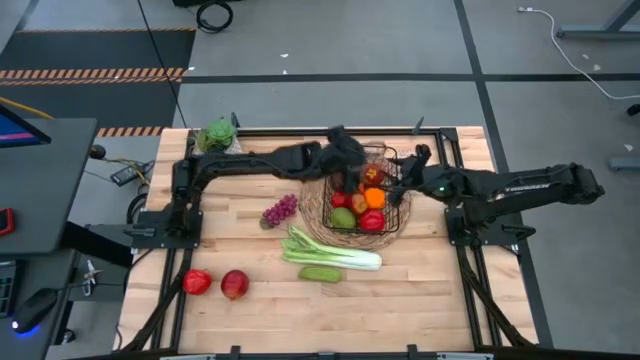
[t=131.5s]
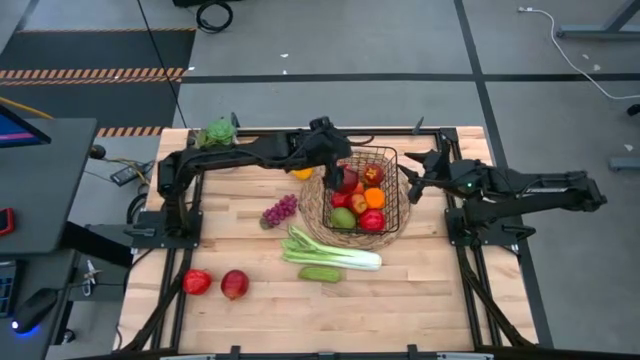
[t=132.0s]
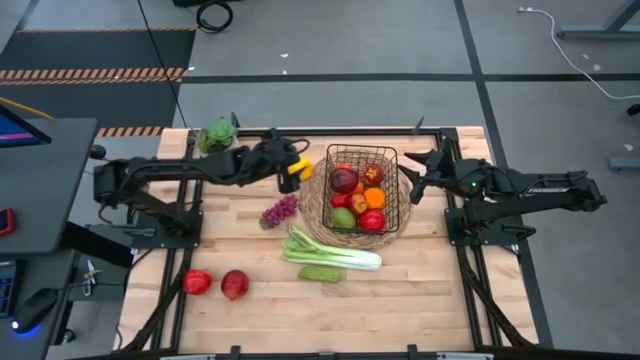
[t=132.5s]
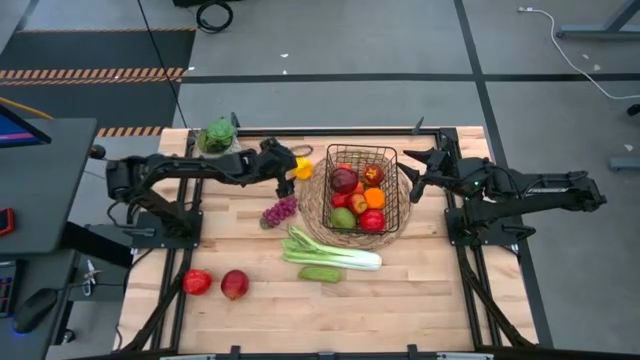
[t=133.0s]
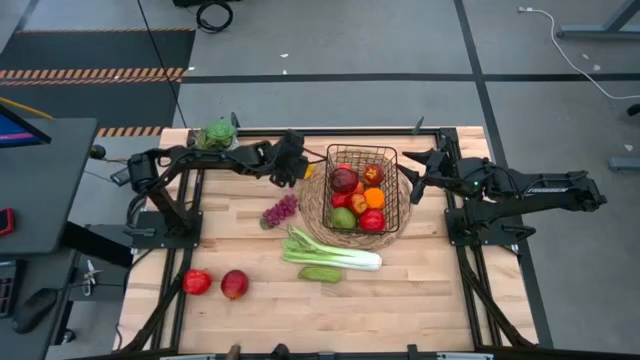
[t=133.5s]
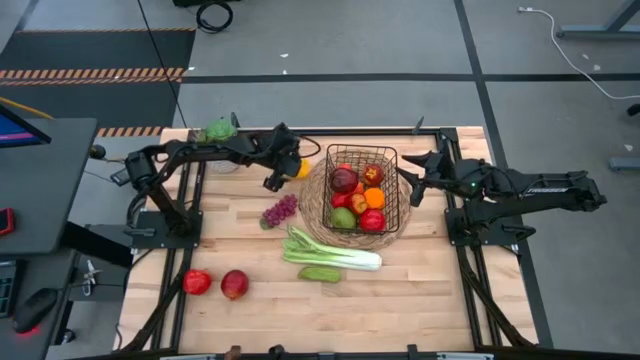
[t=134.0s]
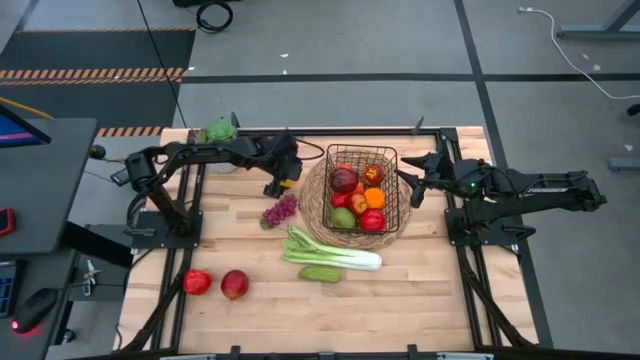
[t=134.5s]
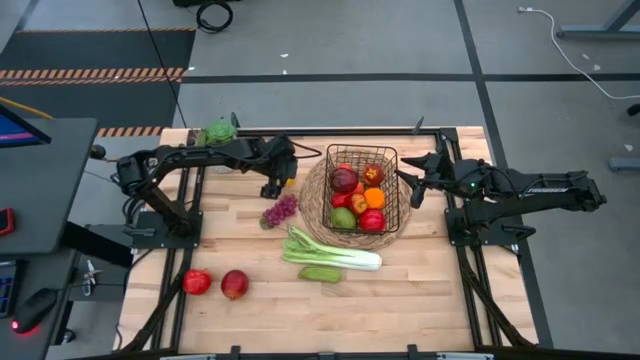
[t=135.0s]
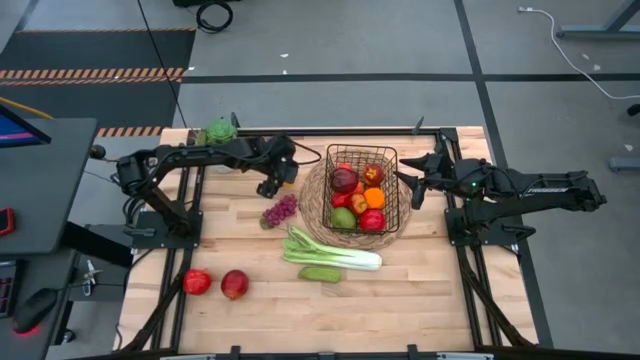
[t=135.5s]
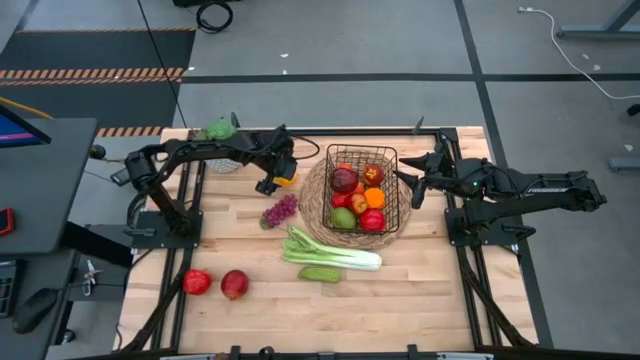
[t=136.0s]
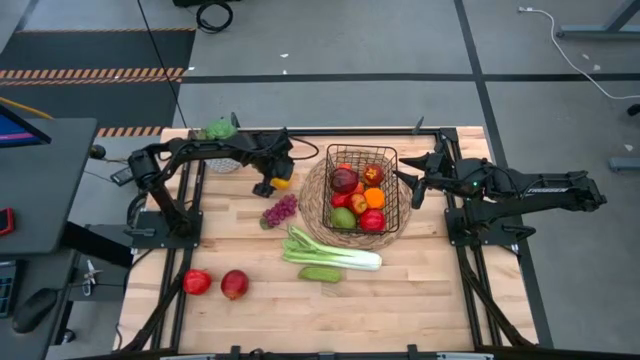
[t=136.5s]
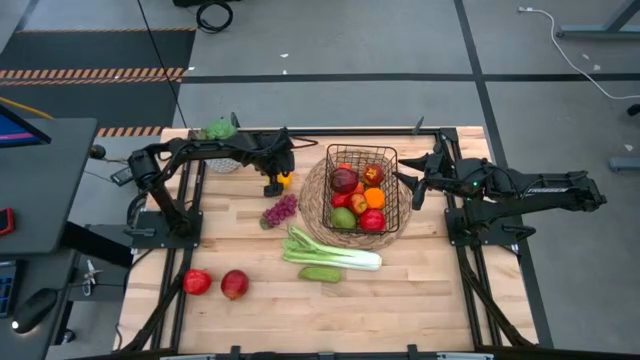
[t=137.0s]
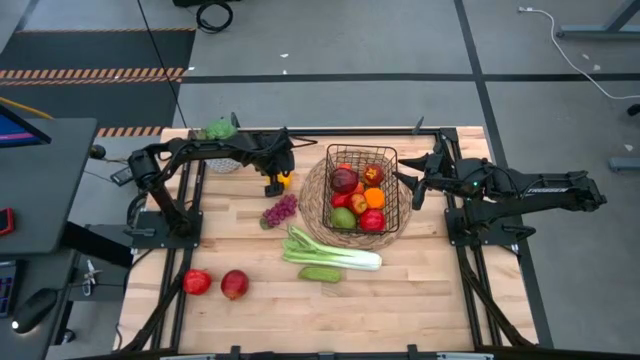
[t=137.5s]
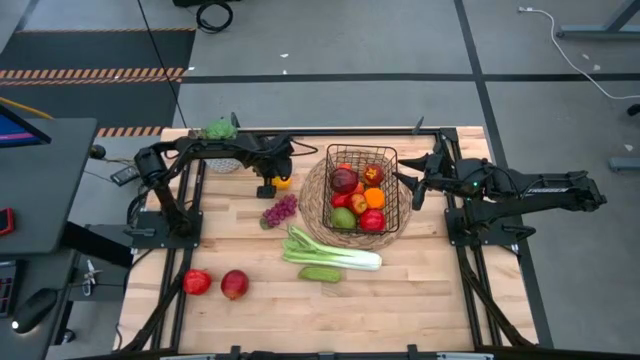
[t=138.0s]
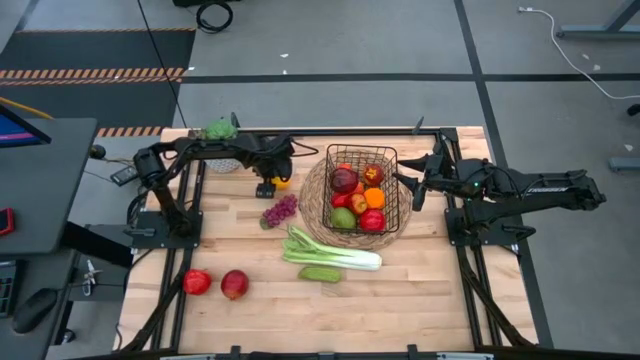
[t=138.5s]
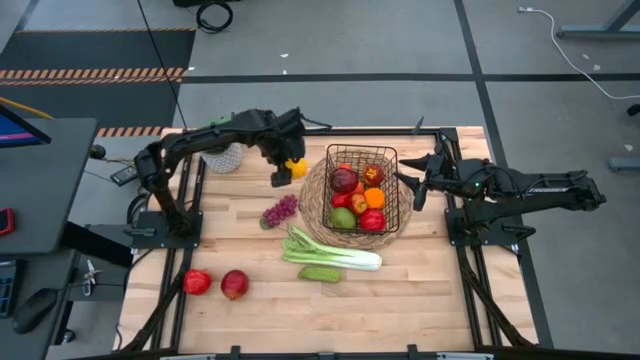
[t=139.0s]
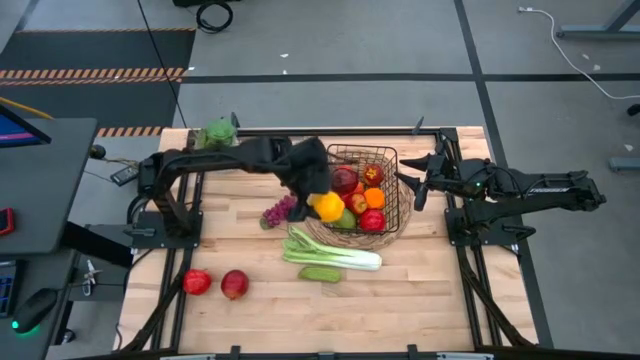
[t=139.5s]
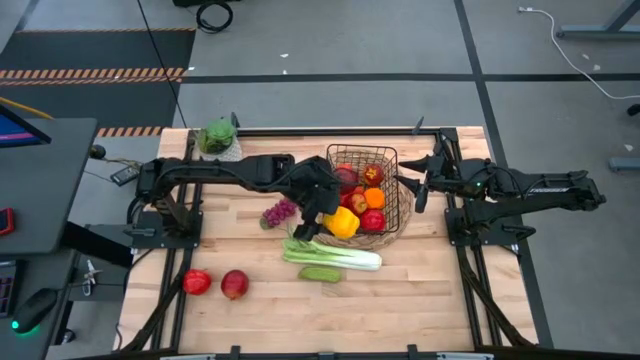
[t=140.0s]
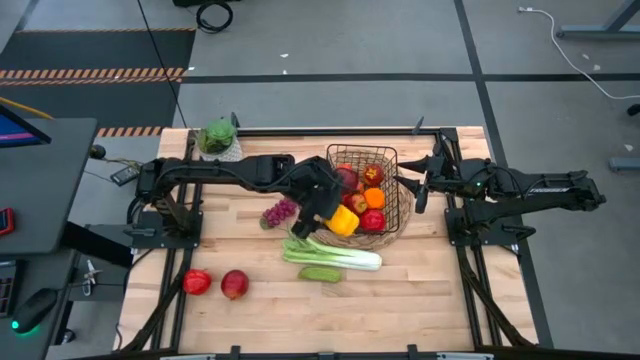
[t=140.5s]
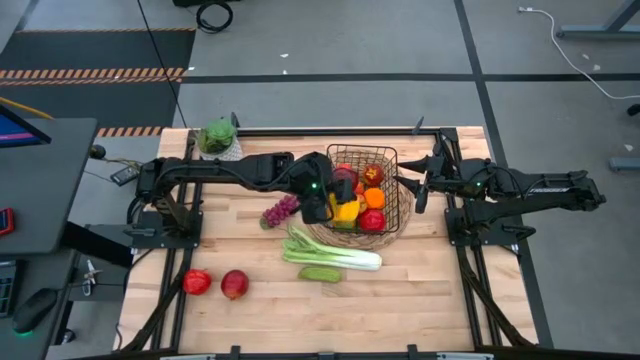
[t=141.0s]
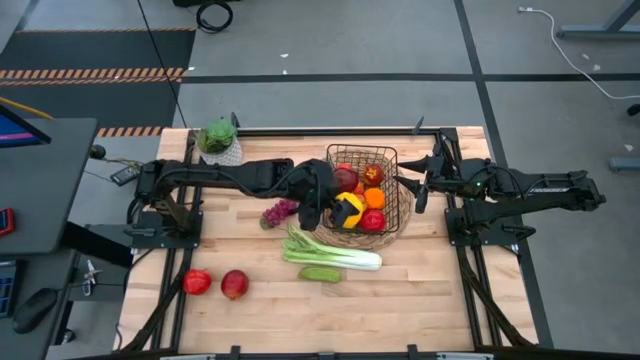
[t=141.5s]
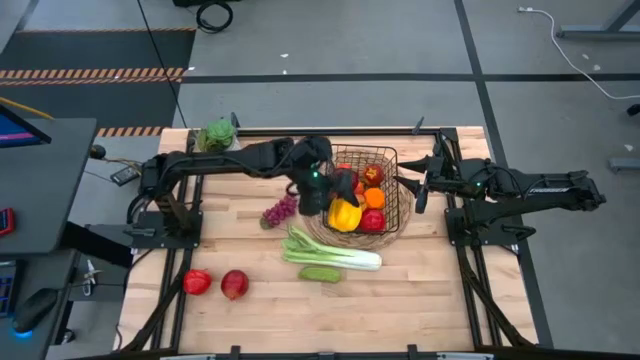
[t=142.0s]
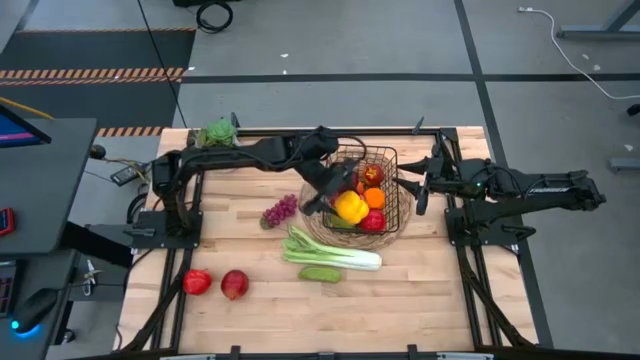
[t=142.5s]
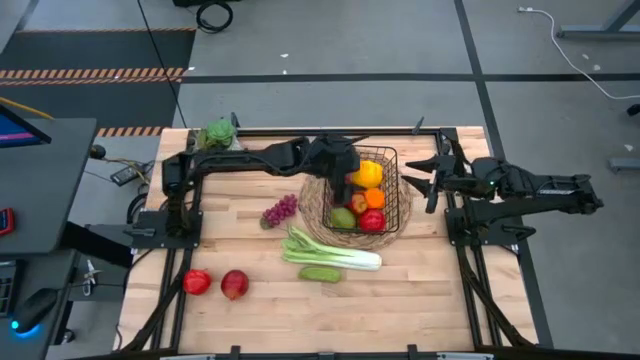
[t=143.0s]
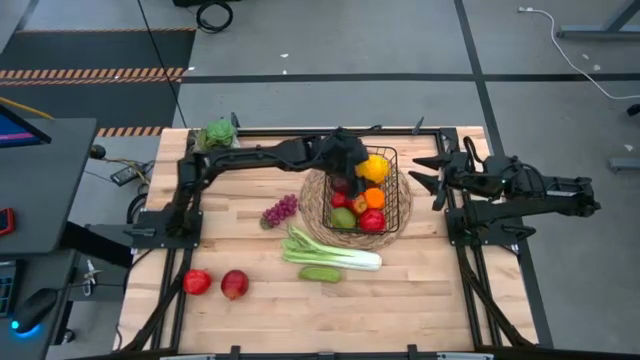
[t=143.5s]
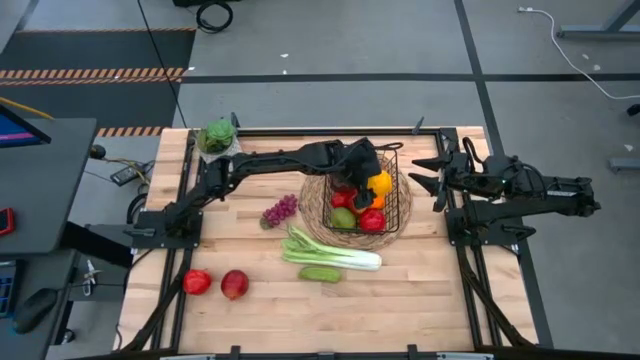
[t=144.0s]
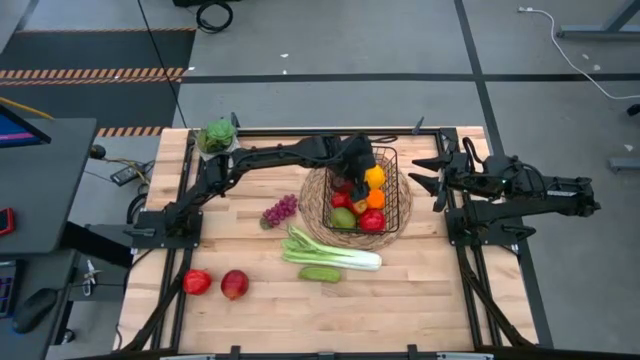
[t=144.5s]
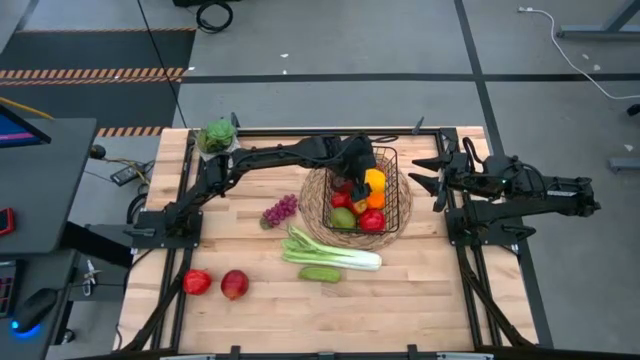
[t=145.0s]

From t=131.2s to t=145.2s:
Task: Build produce basket
Put the yellow bell pepper into the wire basket

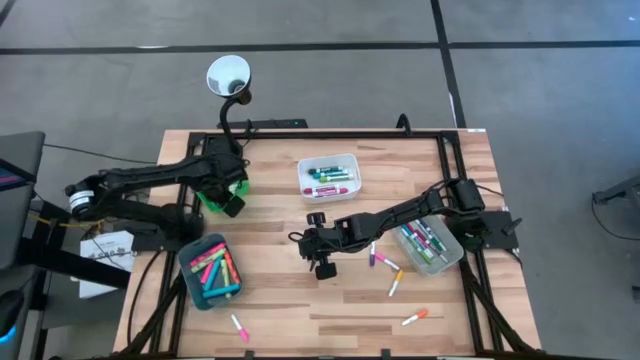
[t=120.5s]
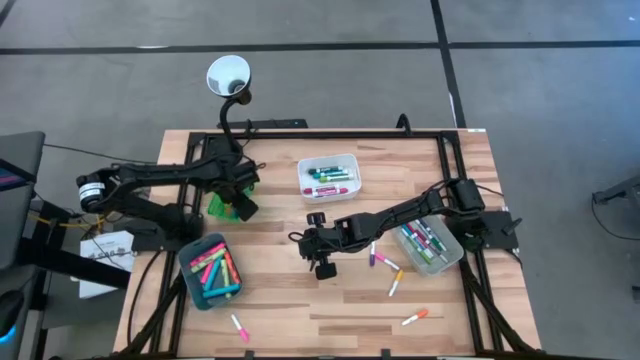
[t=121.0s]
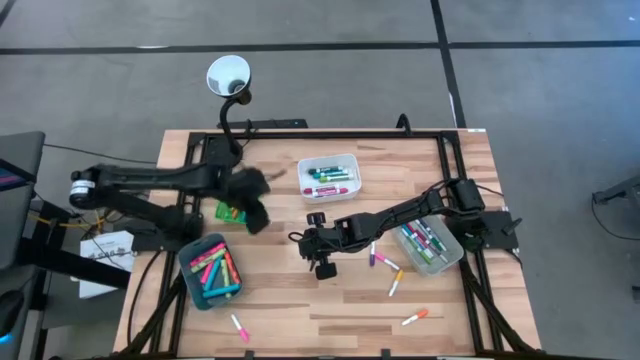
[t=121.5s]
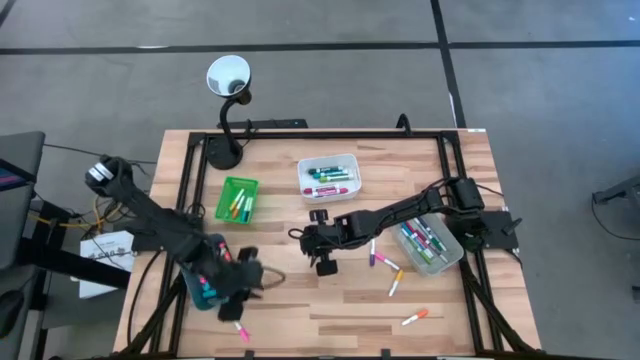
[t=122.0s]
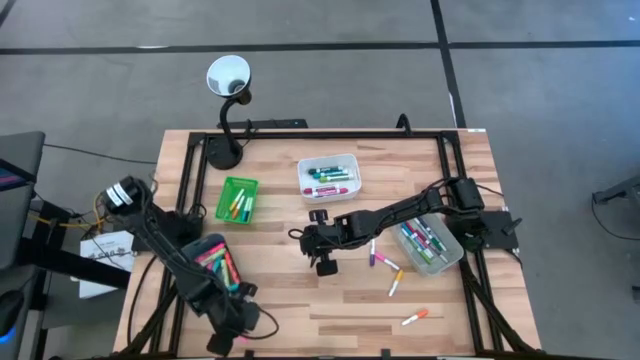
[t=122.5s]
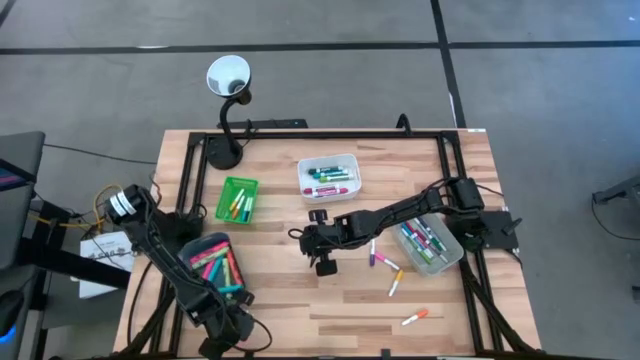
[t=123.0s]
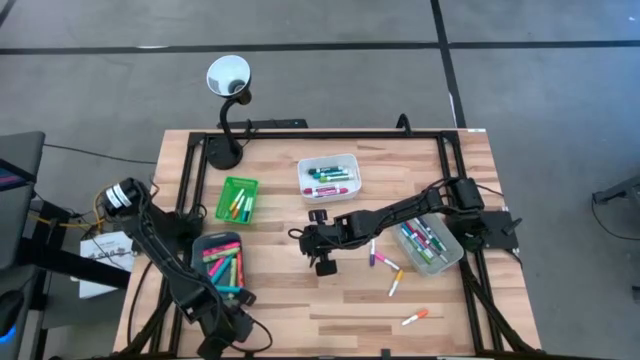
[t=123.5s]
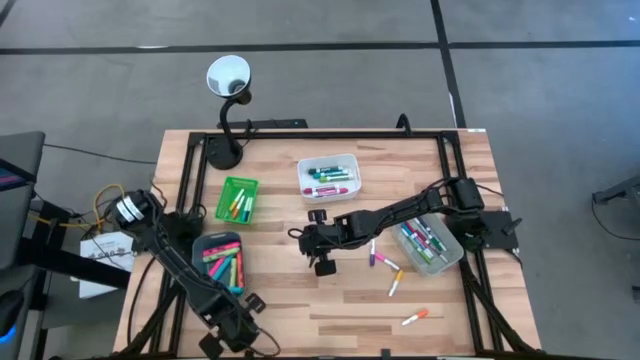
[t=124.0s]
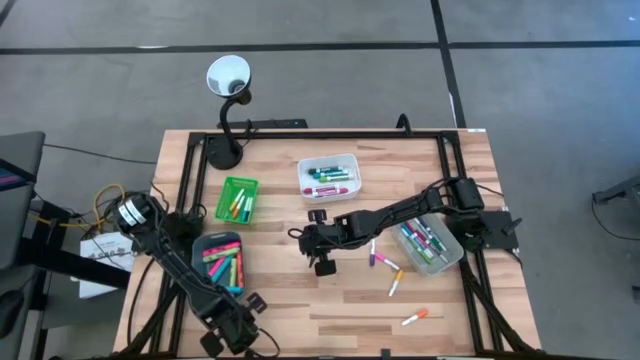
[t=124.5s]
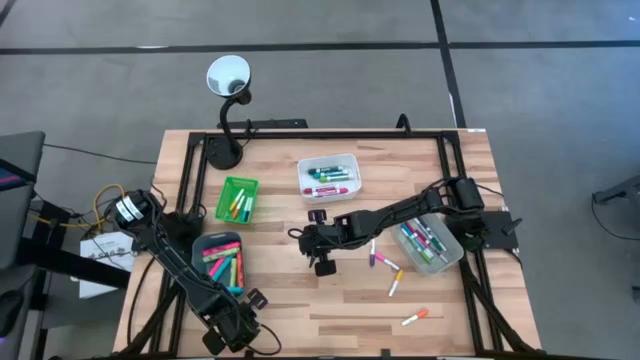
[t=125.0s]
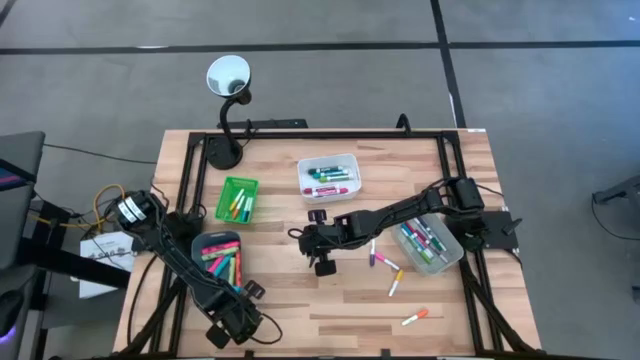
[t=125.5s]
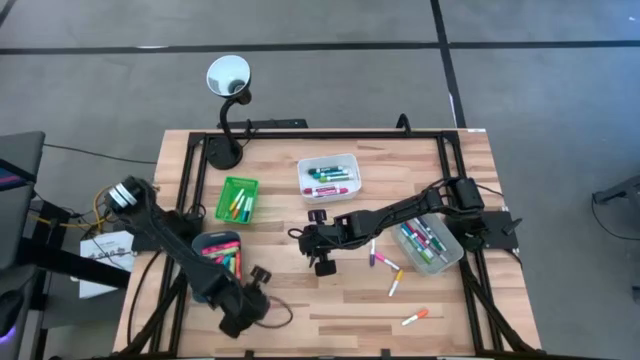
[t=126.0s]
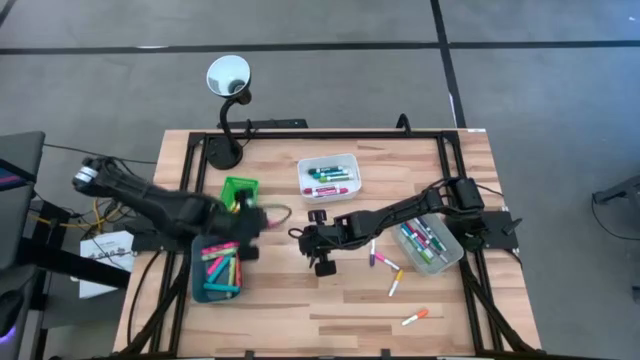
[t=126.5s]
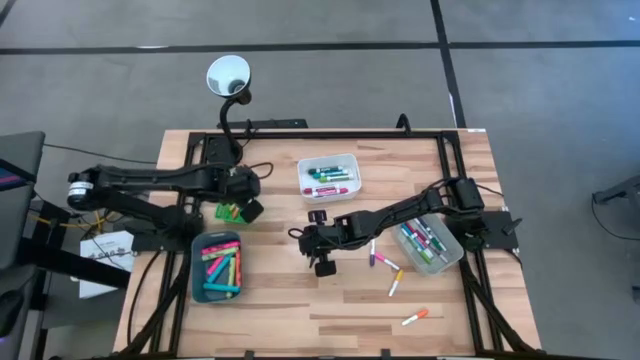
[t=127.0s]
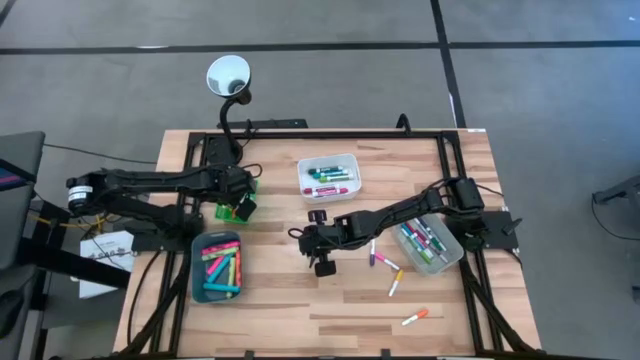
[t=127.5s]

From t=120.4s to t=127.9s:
Task: Pick & Place Markers
Put the small pink highlighter pen into the green bin
